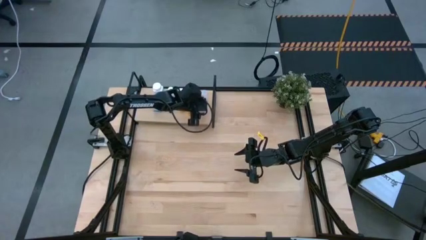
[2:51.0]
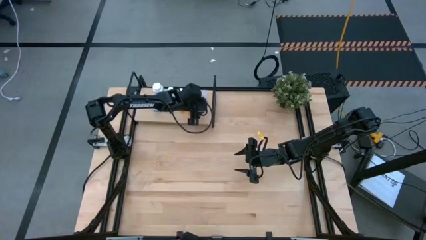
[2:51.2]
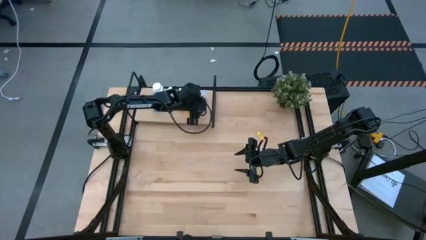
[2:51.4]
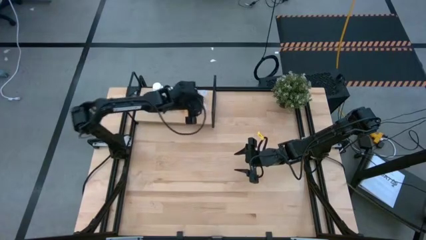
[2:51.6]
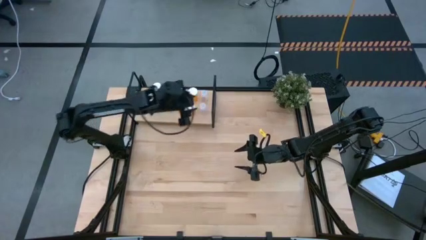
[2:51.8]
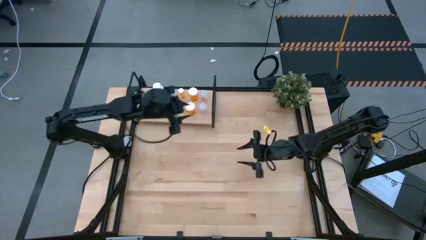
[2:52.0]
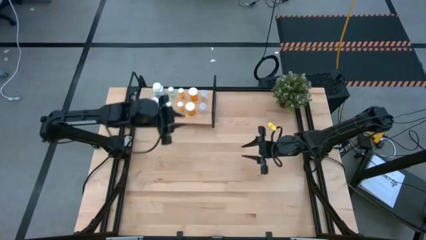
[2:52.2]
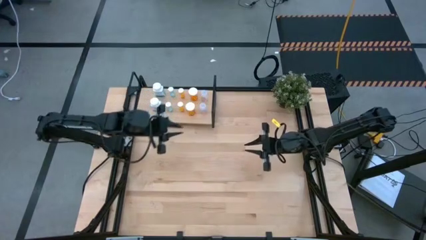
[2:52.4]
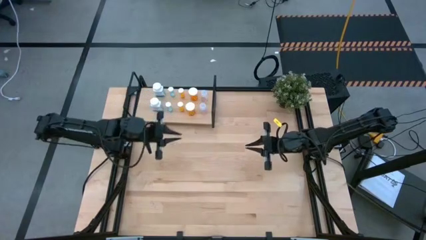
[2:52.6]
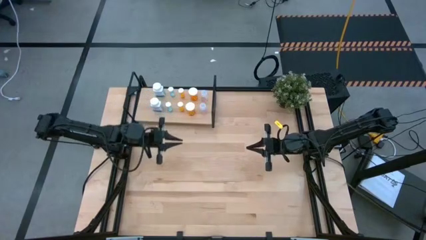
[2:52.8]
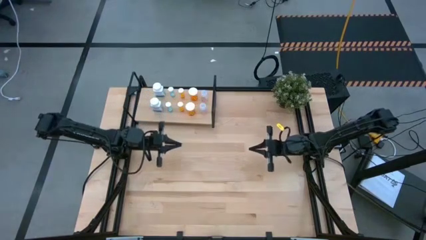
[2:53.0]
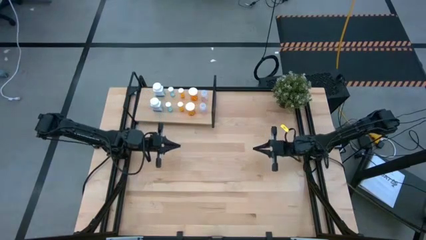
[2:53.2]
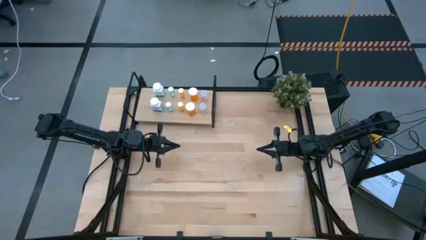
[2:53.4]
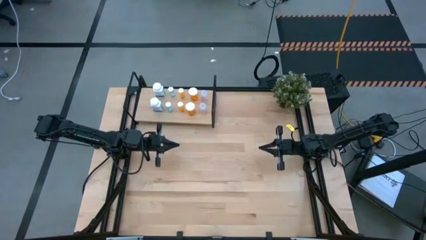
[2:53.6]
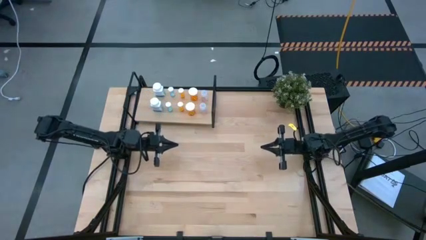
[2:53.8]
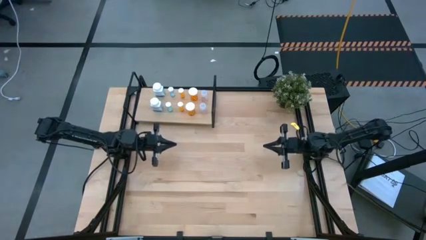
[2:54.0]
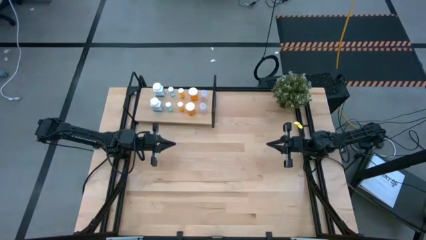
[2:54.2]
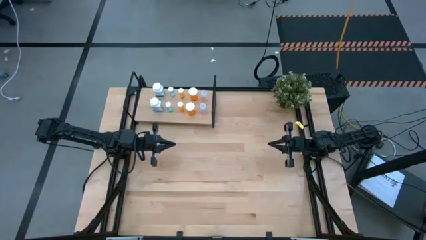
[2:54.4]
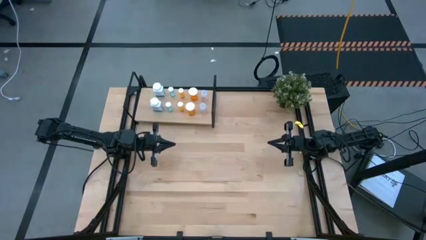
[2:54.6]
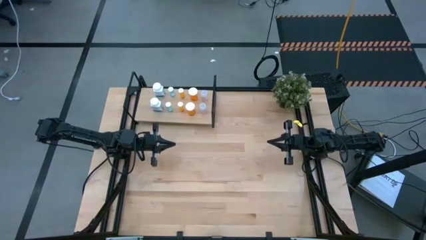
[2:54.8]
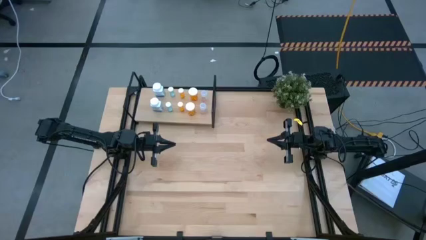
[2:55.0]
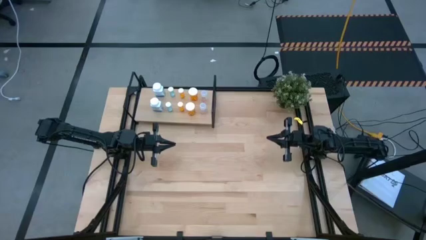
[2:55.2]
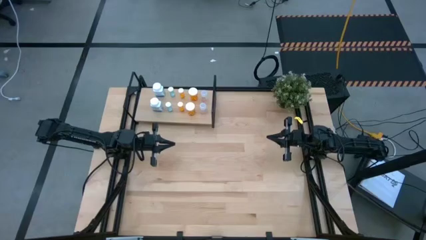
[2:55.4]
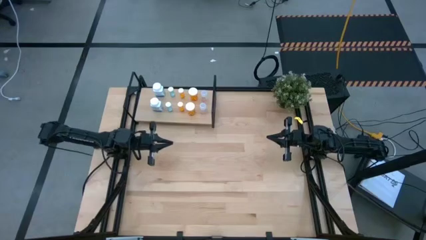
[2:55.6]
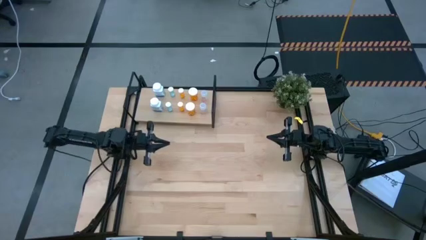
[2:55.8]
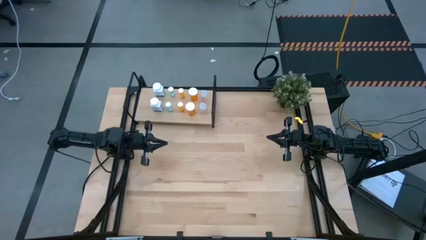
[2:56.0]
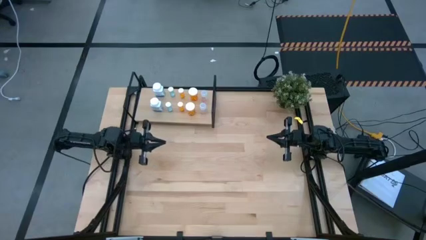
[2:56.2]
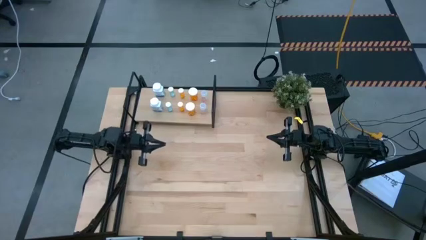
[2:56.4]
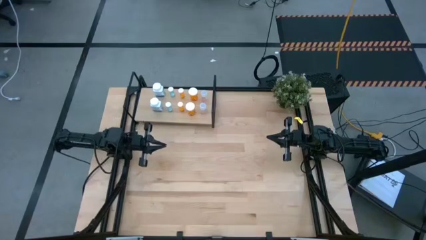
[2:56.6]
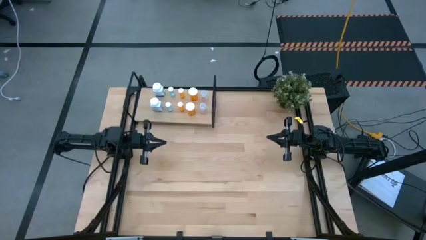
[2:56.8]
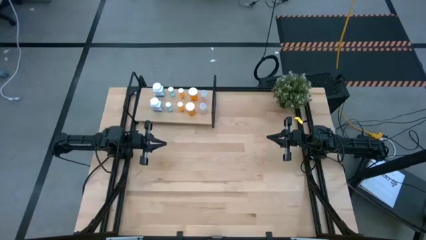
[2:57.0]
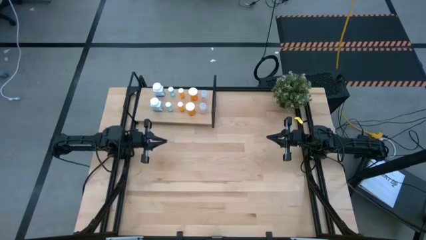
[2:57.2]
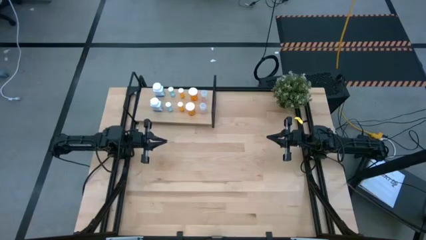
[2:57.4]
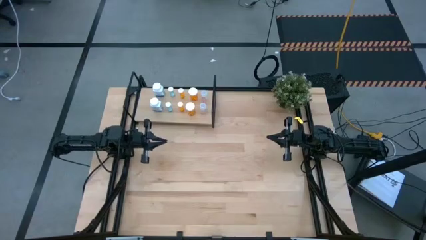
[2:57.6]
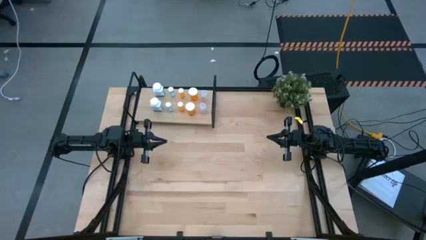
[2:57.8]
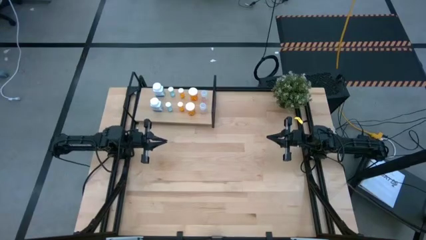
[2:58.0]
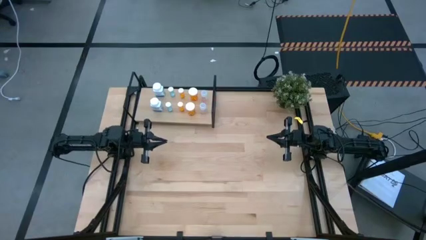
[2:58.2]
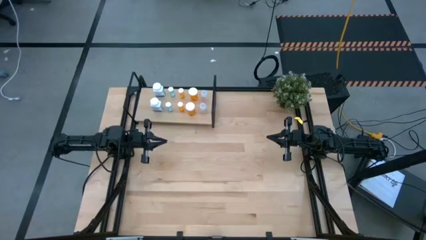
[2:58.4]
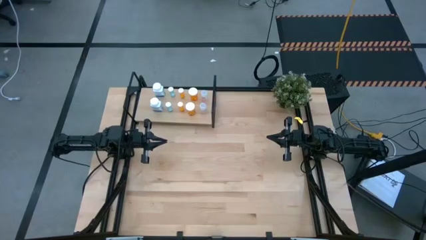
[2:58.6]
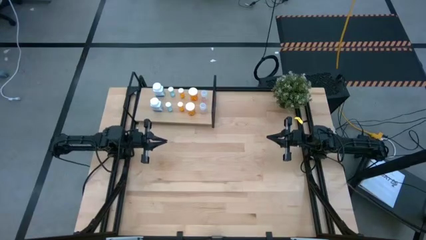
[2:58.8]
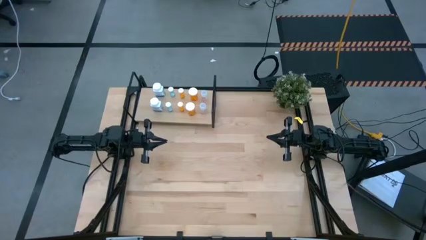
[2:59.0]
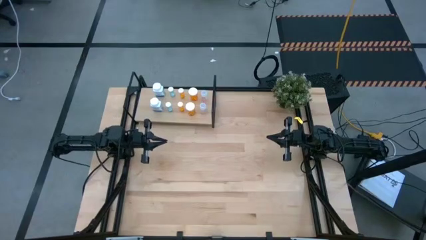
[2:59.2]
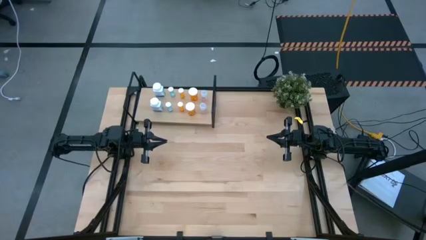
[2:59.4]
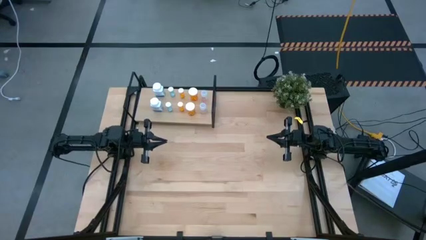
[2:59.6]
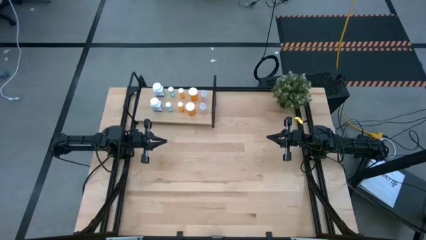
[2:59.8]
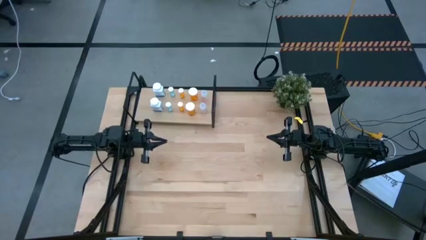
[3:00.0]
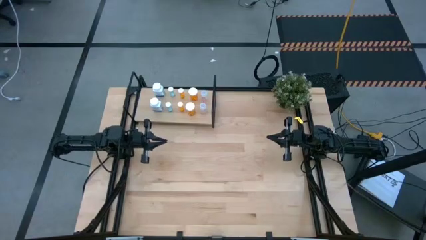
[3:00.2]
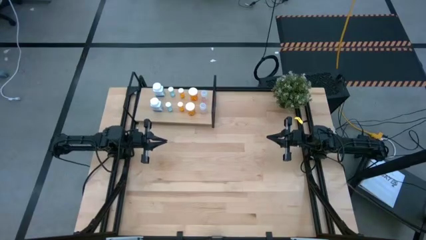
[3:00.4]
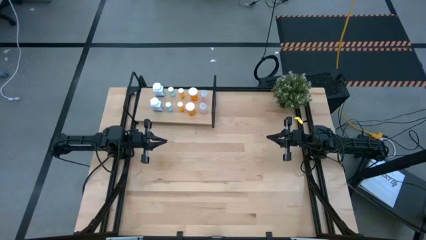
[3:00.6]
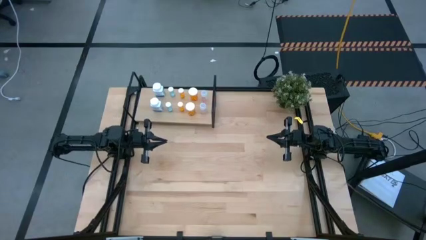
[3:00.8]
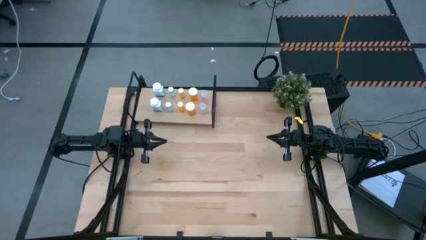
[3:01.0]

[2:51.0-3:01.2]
Task: Pick and place medicine bottles onto shelf by color
Return to Home Position

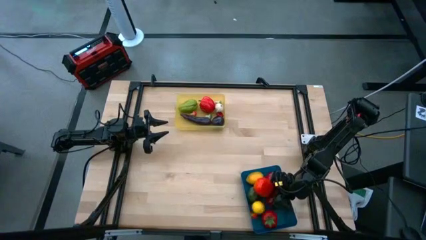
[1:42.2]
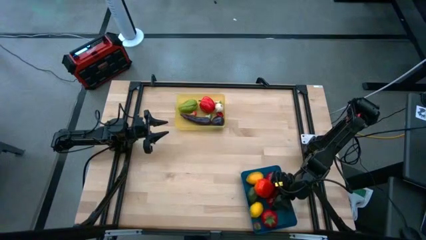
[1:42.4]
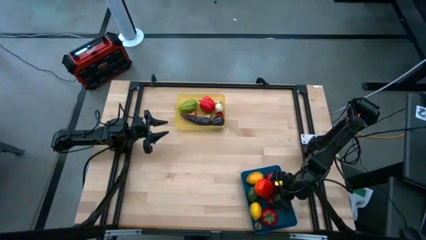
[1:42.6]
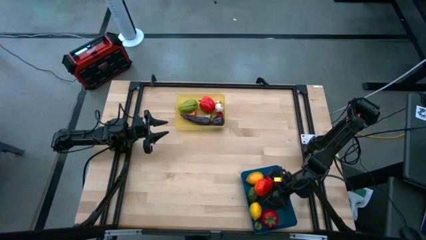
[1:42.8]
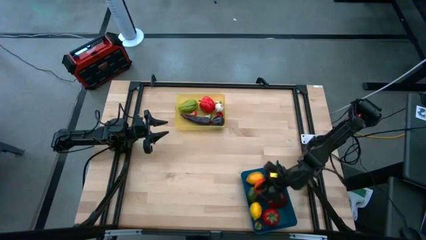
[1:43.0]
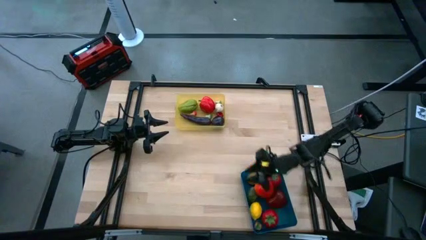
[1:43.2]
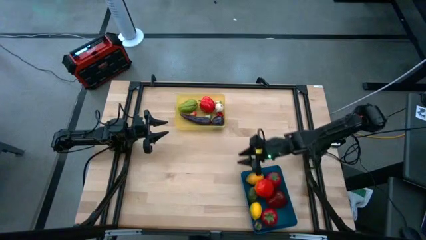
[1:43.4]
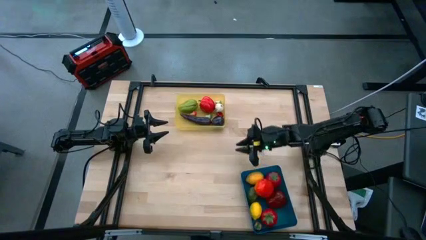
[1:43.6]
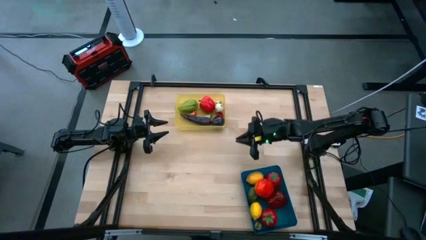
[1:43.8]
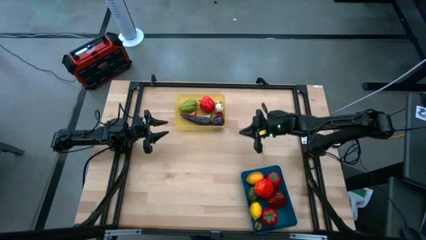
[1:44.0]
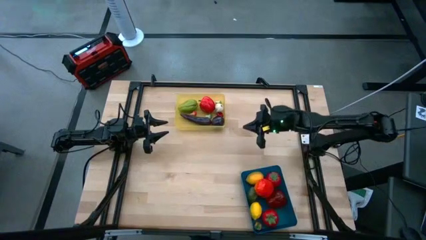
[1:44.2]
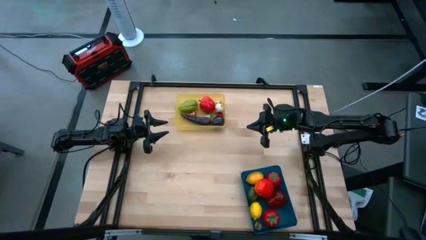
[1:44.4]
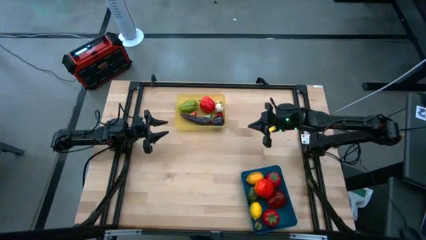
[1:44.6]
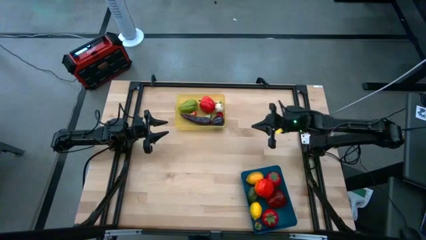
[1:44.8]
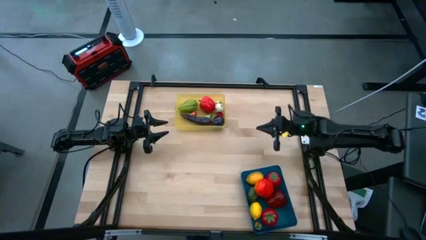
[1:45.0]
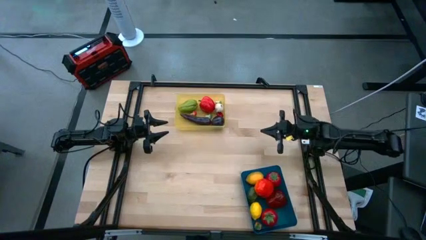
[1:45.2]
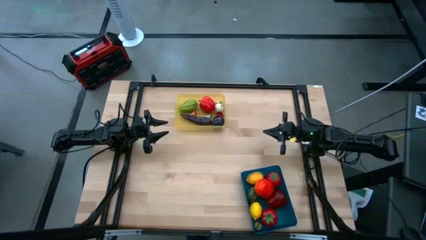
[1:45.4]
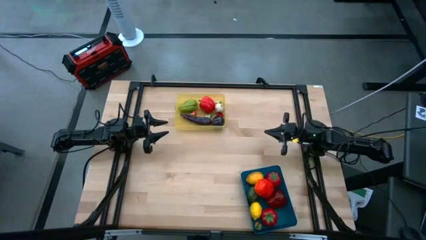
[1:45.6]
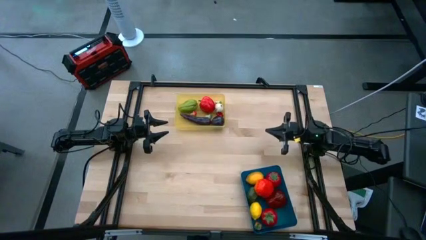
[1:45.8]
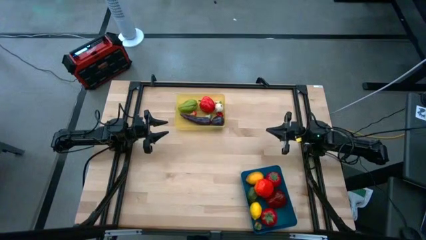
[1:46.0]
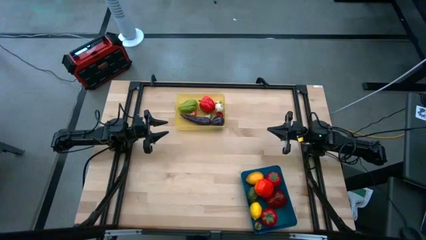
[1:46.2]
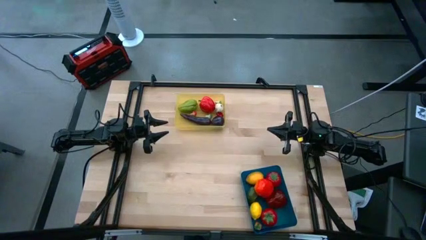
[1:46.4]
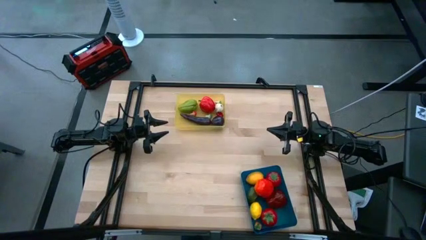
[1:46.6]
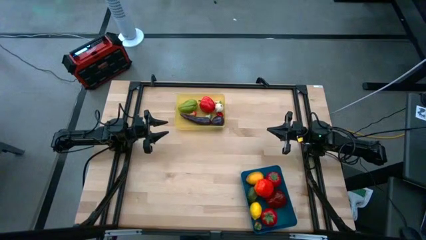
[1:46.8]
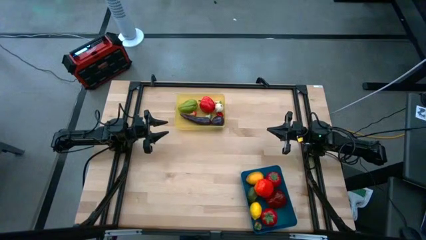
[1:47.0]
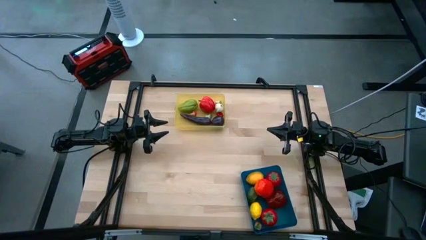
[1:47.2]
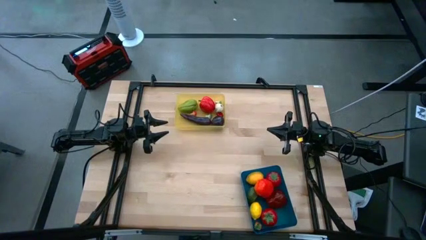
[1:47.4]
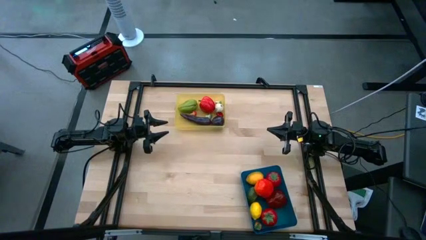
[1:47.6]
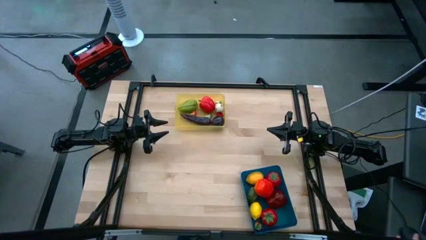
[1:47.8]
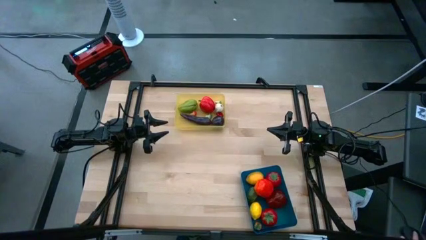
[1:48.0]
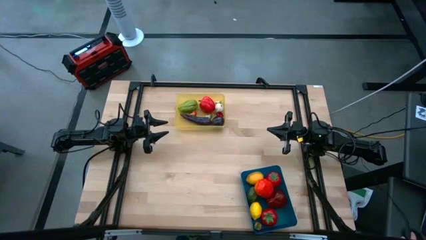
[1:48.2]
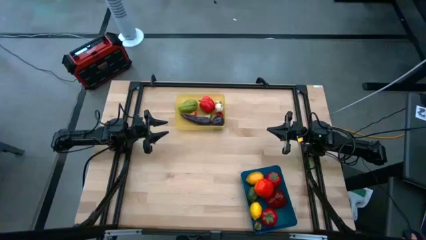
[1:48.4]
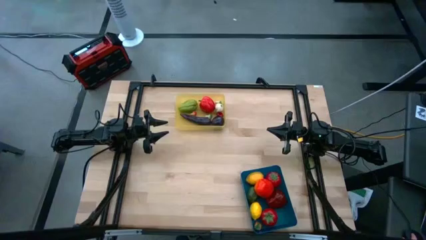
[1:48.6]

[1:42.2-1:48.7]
Task: Sort produce into baskets
Return to Home Position
